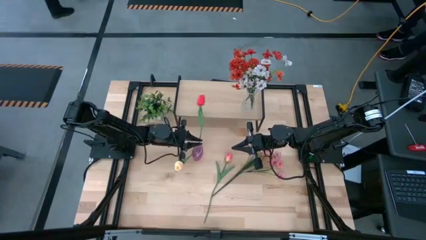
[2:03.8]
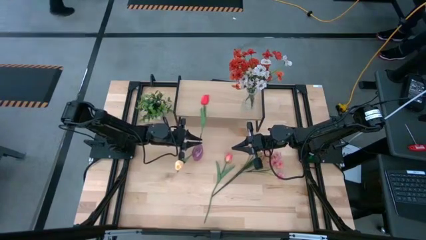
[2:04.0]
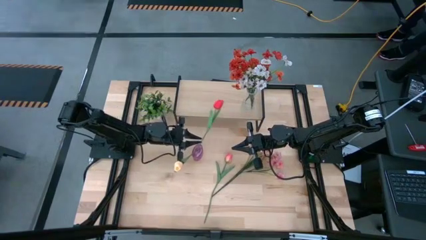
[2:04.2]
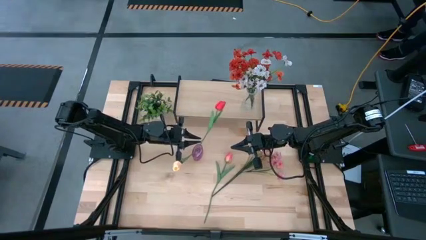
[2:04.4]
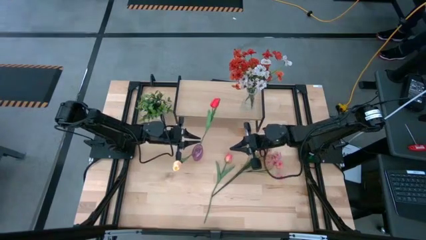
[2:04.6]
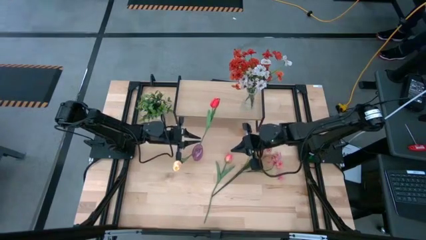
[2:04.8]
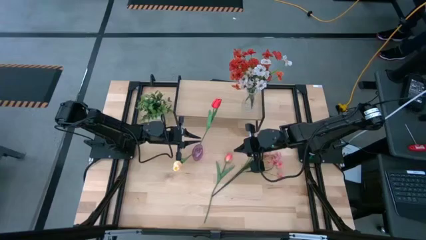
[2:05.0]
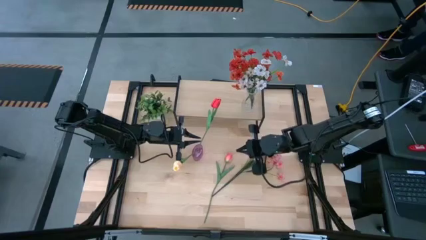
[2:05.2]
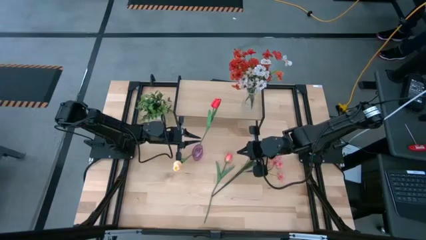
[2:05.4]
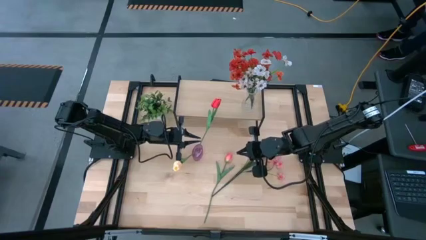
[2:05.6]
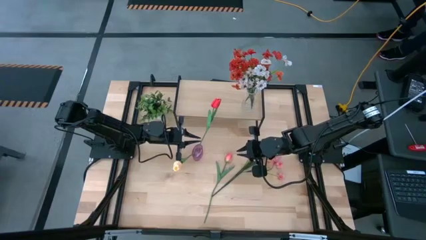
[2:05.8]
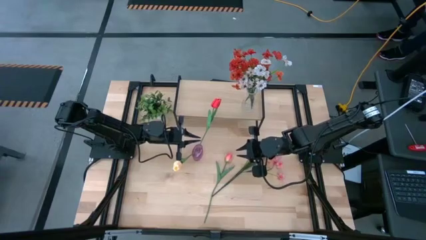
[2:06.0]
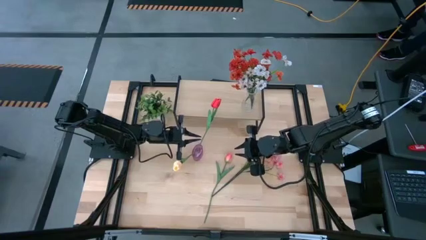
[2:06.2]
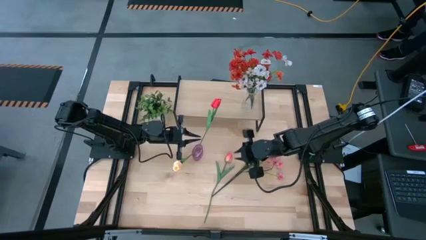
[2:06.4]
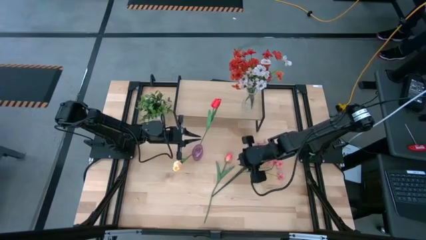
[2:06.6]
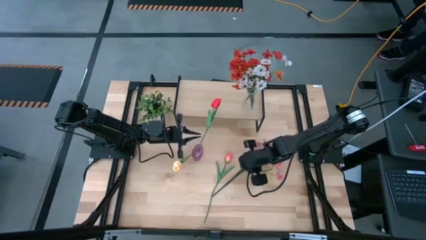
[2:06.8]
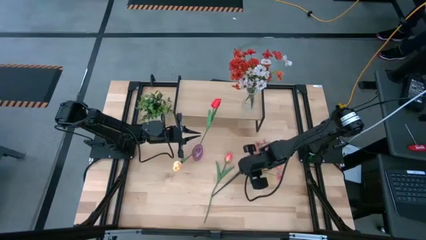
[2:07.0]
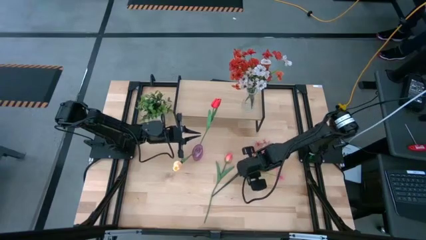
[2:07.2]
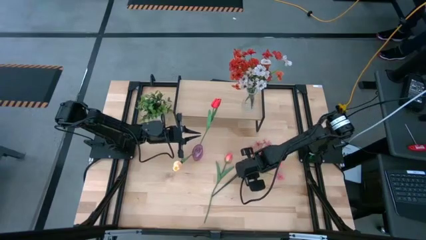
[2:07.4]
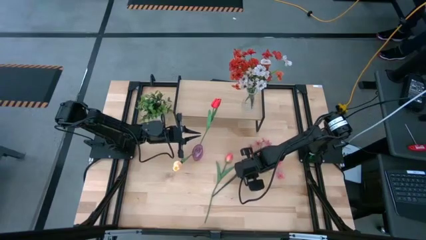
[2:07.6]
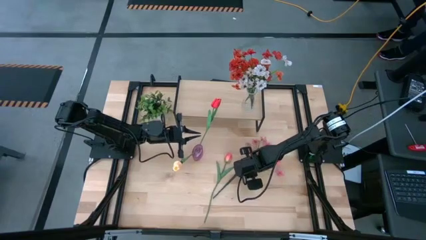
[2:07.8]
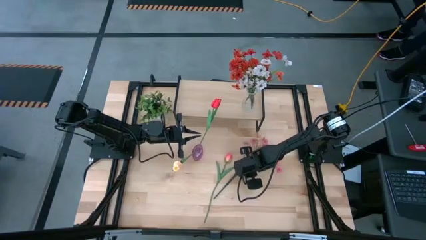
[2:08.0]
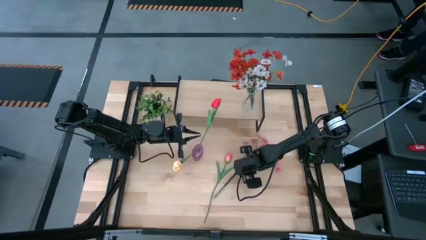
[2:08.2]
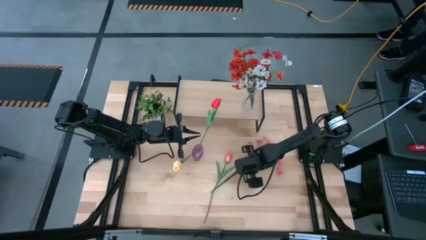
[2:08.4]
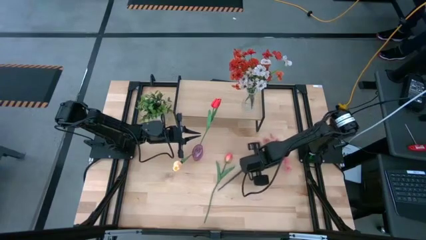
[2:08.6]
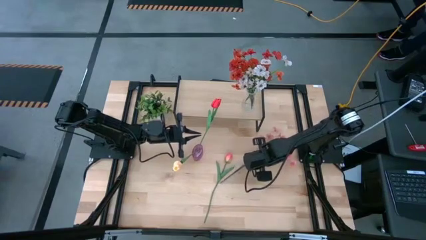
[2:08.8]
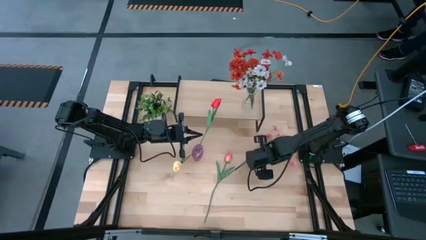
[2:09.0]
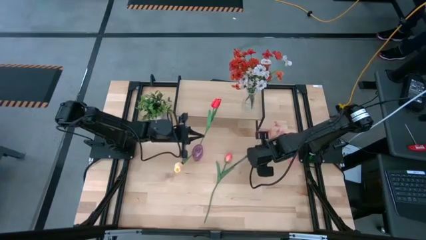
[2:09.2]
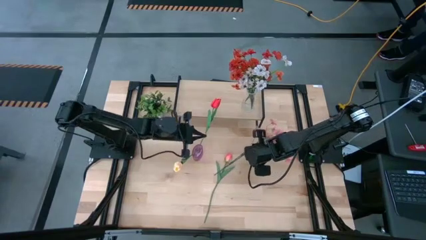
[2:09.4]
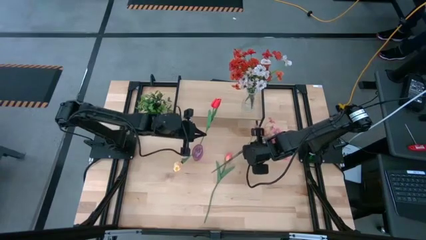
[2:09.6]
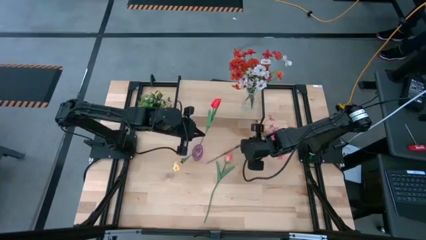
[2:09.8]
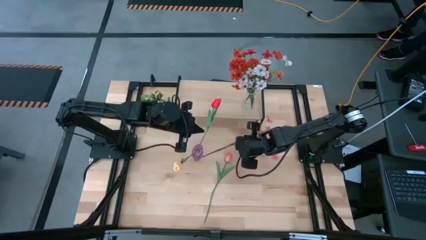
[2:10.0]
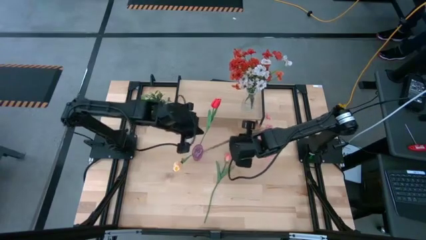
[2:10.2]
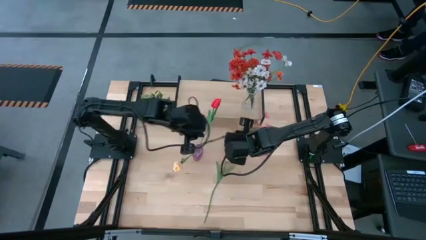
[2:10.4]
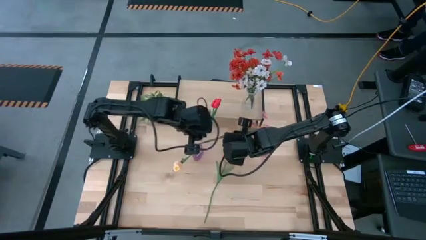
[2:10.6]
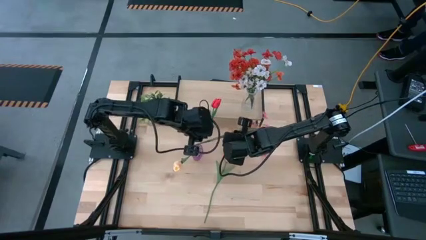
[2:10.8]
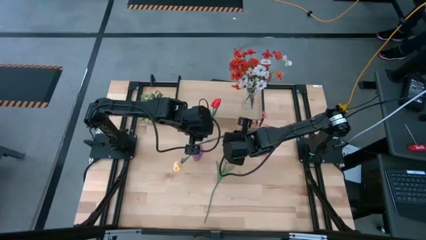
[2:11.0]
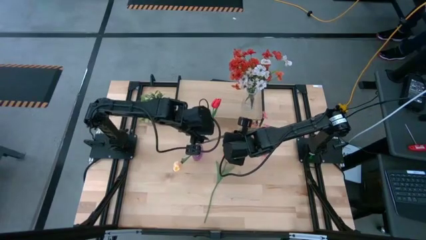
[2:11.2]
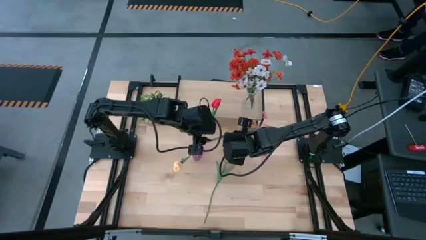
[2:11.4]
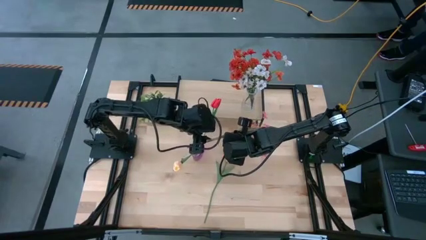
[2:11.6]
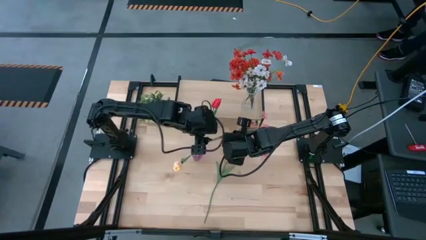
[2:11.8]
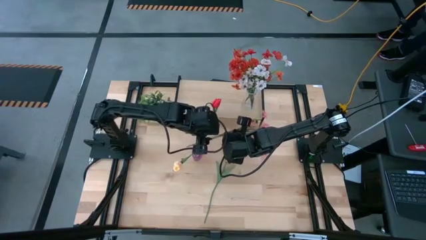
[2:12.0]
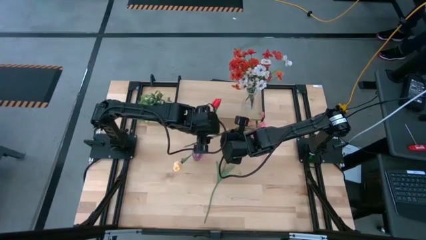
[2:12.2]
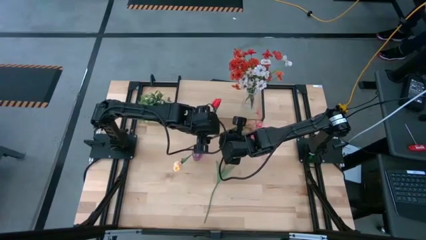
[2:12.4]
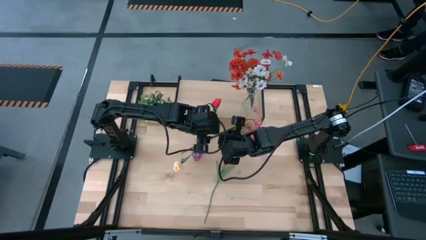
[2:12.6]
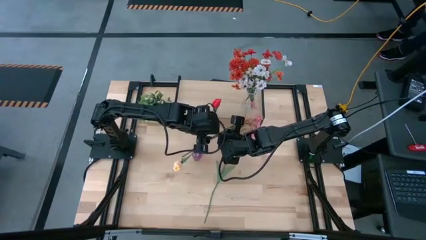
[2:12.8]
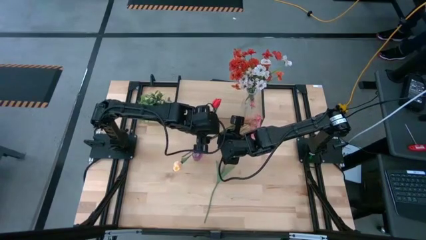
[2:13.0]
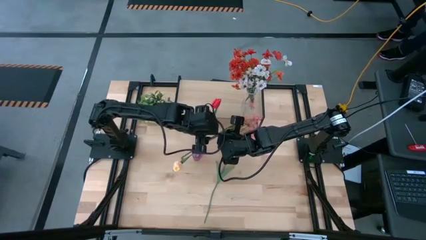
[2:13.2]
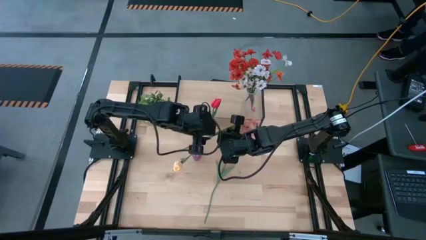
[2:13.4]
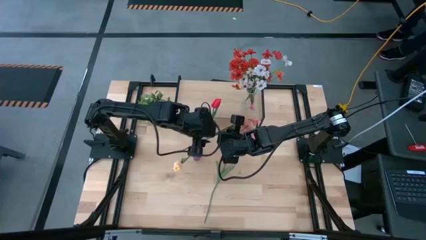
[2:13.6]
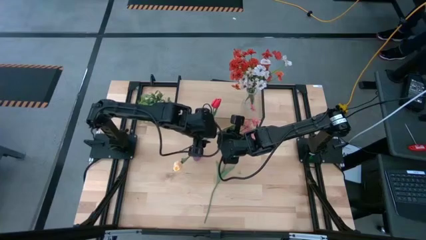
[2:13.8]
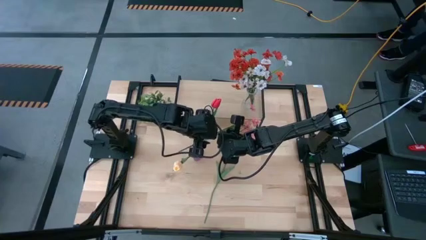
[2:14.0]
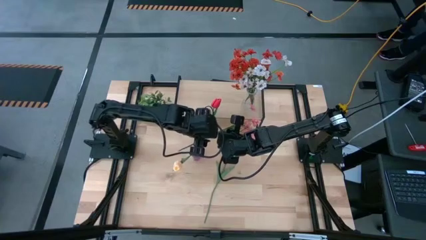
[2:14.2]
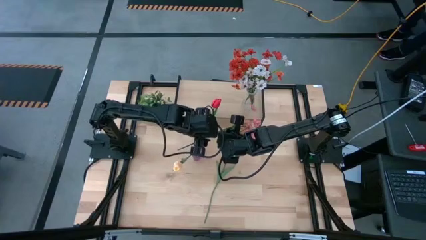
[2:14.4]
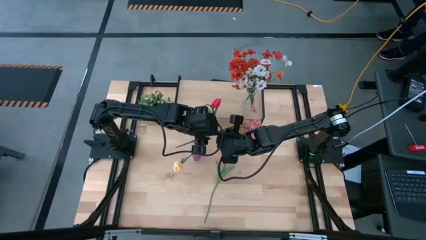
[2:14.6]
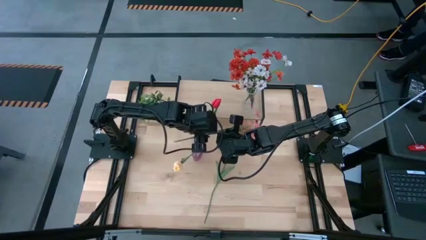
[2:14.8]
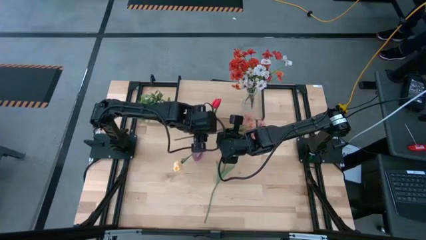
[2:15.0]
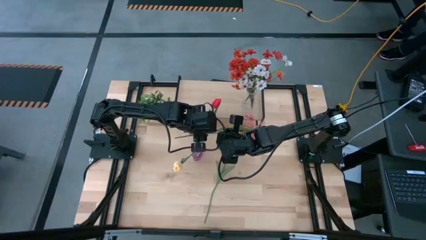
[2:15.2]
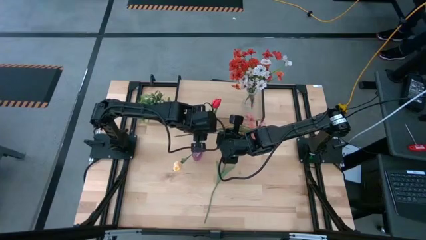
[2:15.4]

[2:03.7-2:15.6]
Task: Pick and place flowers into a vace then onto a shelf
Put the pink flowers into the purple vase

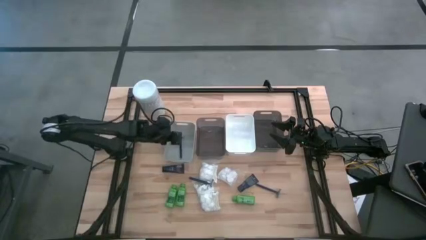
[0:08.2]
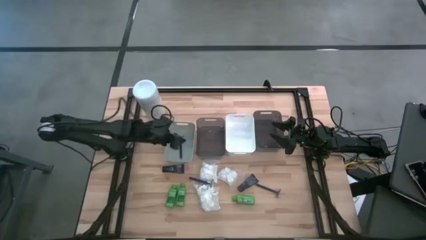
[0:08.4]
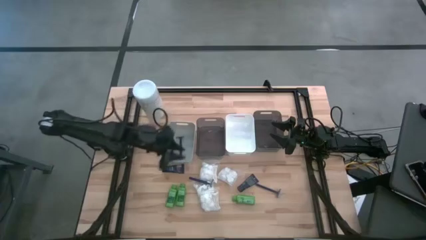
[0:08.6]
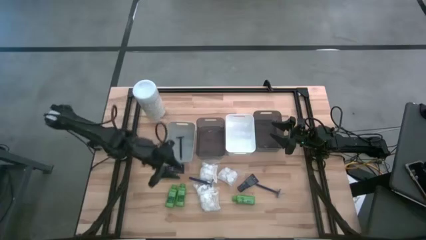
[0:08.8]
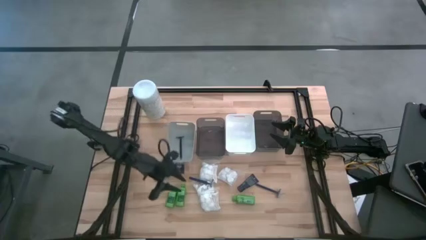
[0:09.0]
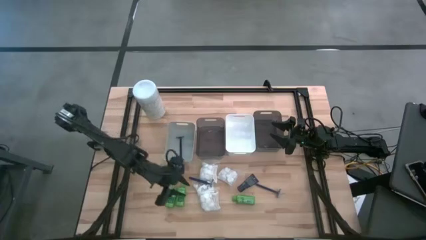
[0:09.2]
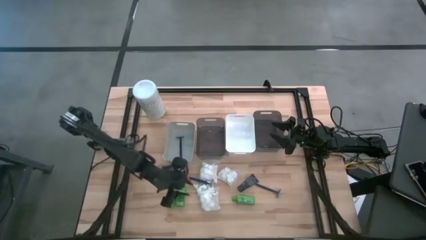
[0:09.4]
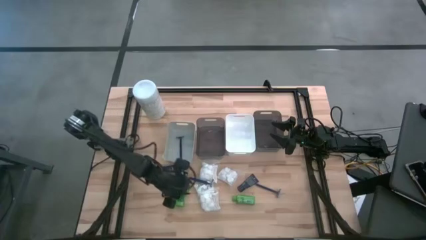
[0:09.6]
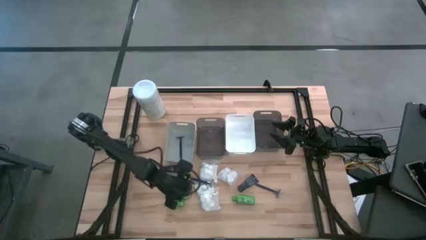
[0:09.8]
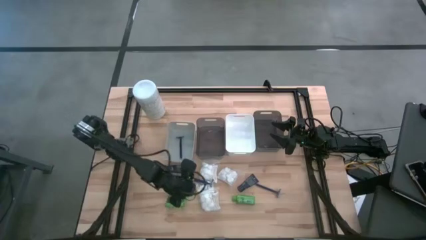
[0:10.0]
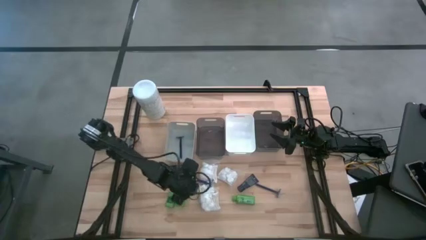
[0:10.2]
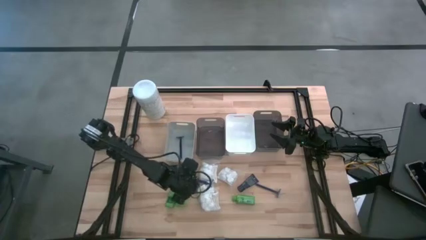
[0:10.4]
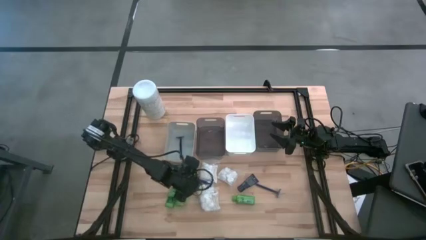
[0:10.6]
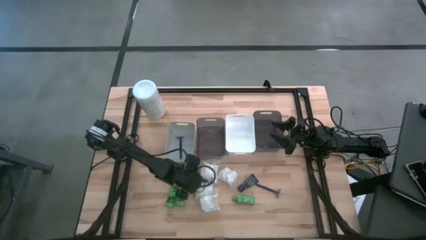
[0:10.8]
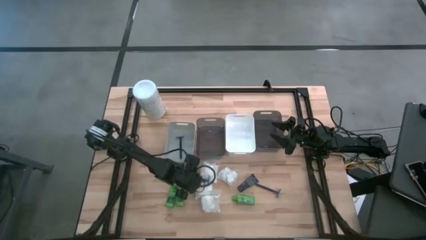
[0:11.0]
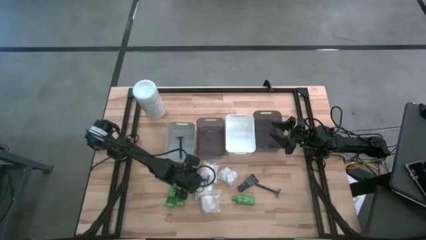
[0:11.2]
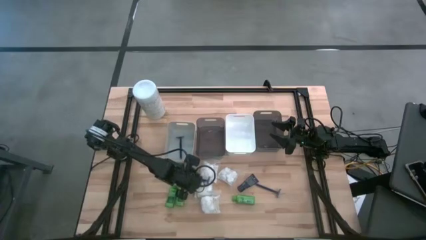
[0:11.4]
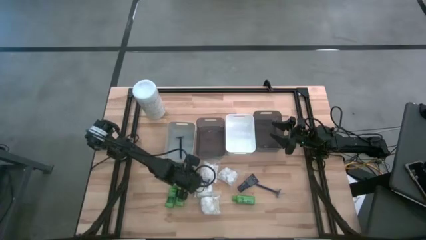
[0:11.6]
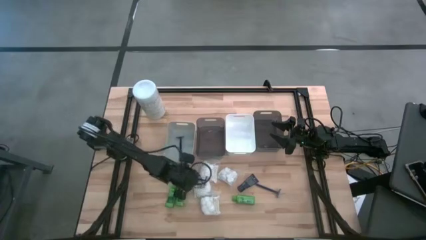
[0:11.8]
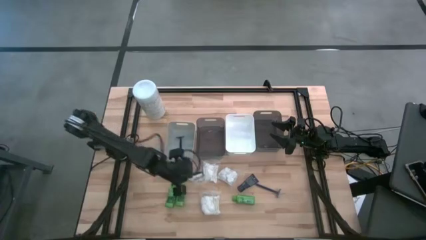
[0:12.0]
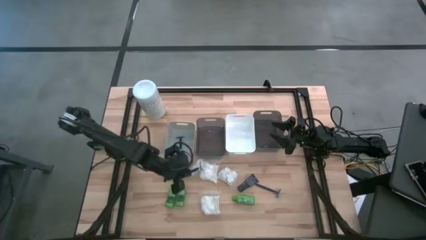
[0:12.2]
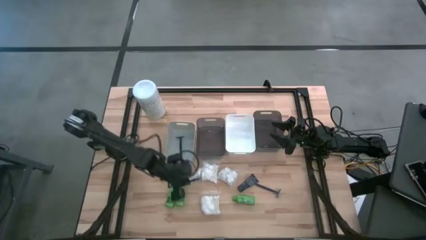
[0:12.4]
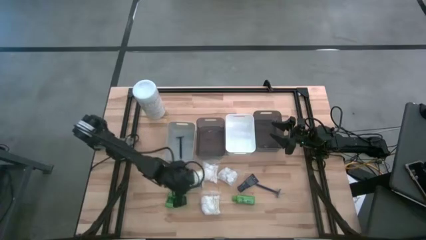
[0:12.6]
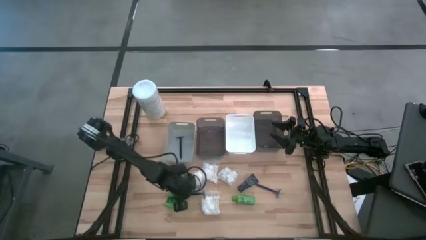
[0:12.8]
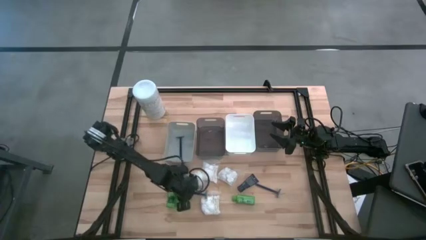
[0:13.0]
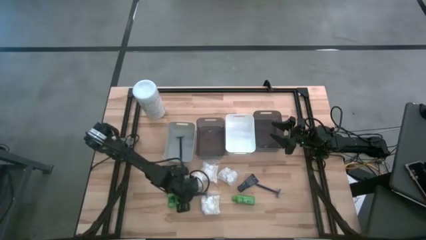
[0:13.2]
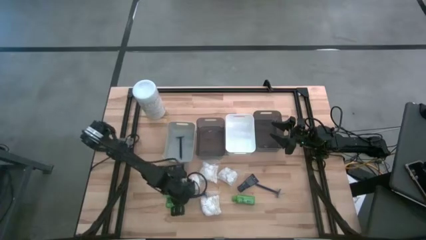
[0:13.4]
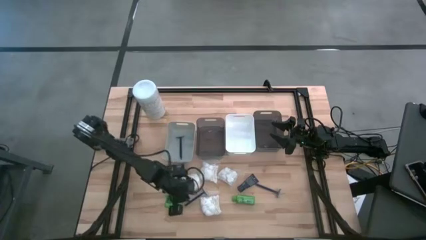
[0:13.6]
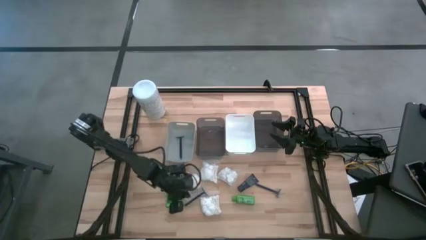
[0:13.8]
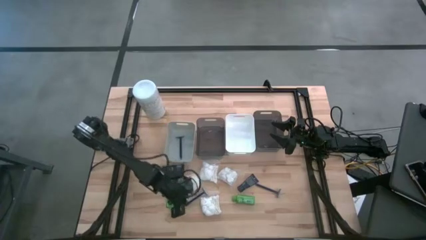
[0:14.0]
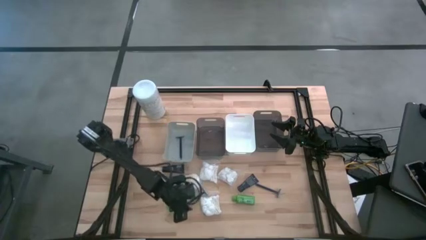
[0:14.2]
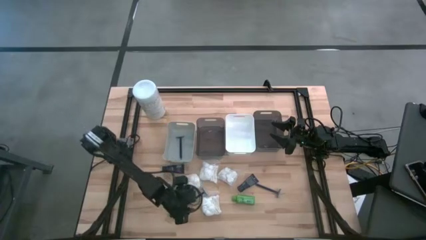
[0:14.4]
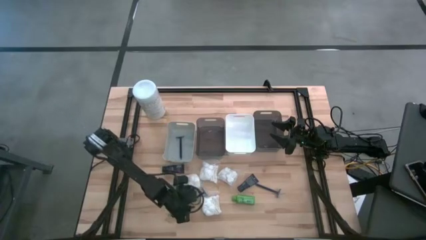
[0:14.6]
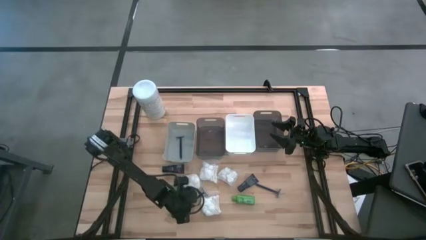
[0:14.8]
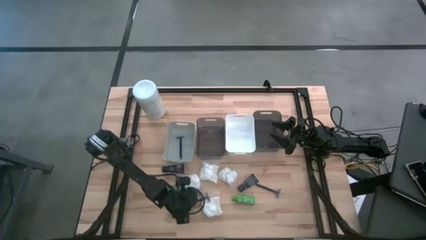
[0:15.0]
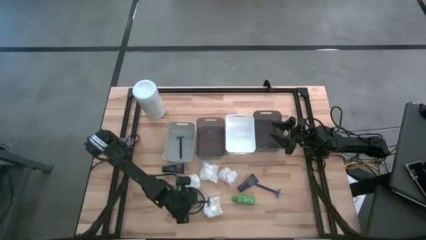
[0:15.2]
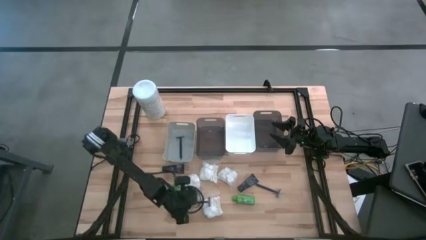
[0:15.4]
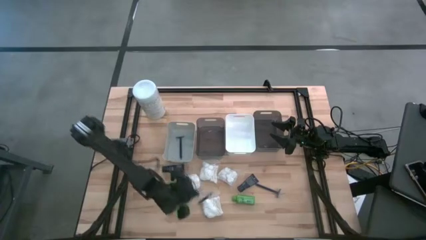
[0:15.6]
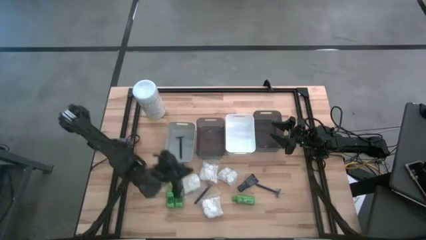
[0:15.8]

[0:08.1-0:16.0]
Task: Pick & Place Travel size toiletries
Put the left razor into the gray bin
